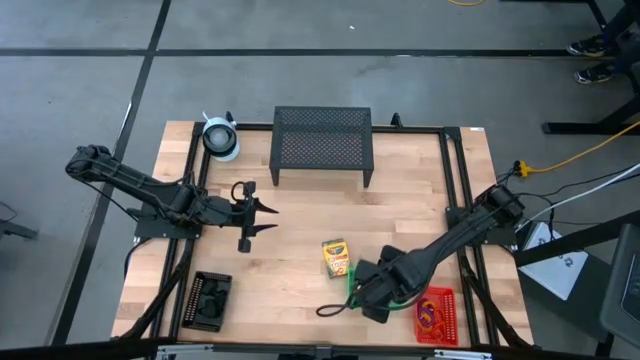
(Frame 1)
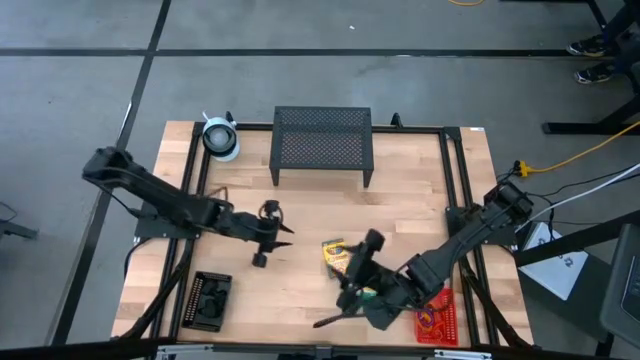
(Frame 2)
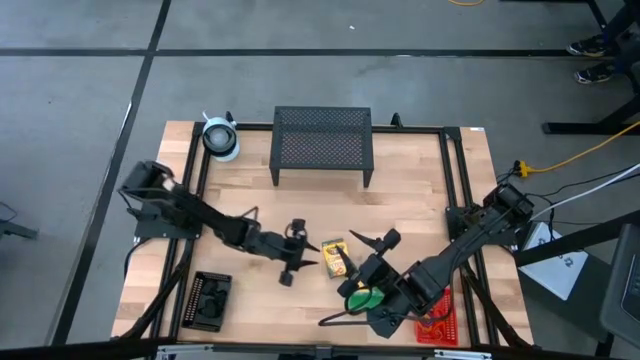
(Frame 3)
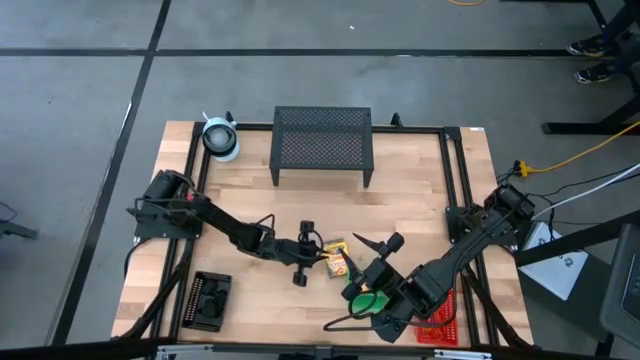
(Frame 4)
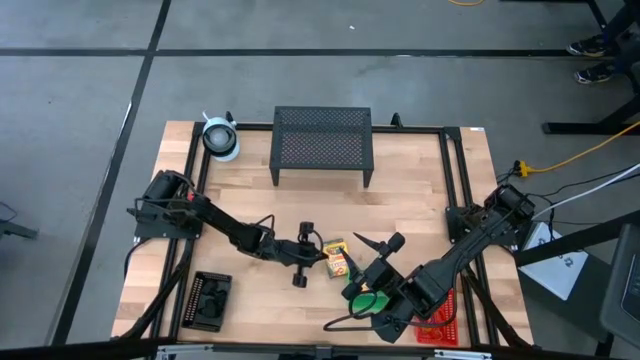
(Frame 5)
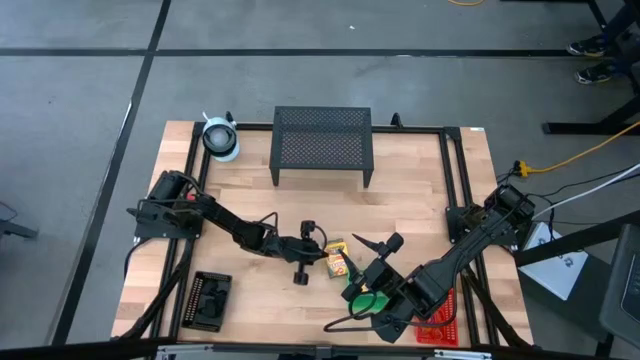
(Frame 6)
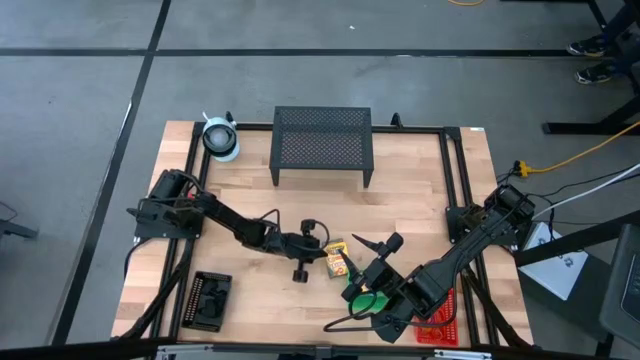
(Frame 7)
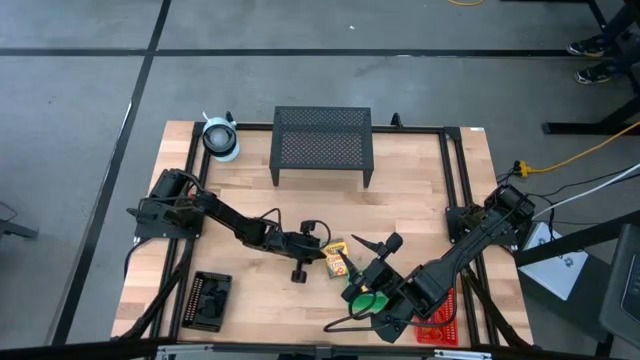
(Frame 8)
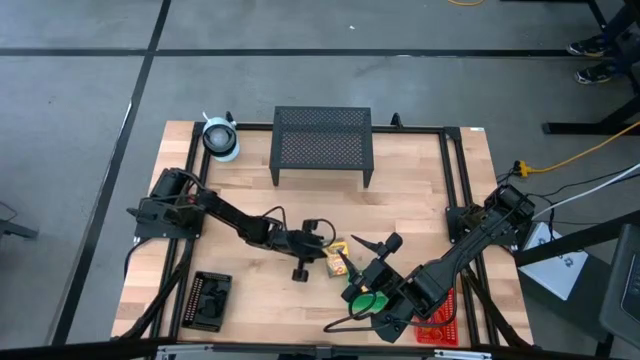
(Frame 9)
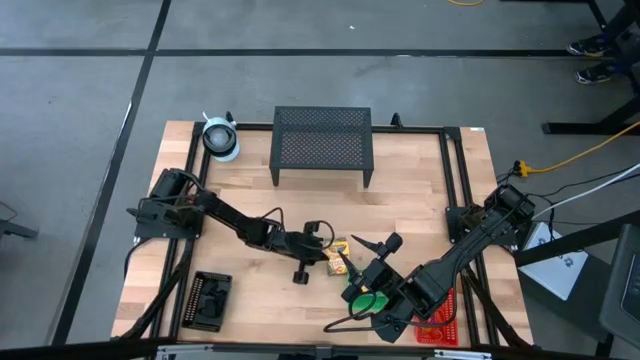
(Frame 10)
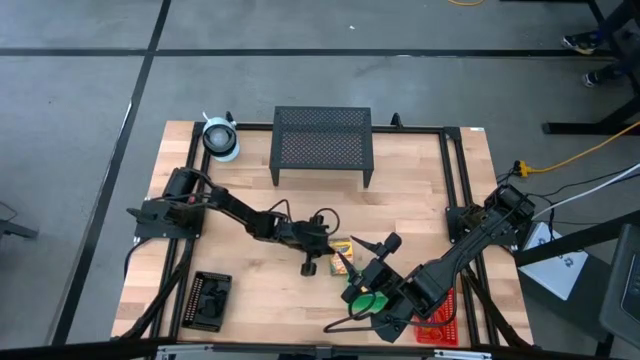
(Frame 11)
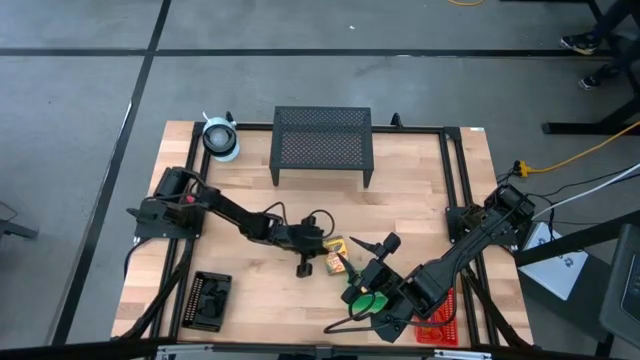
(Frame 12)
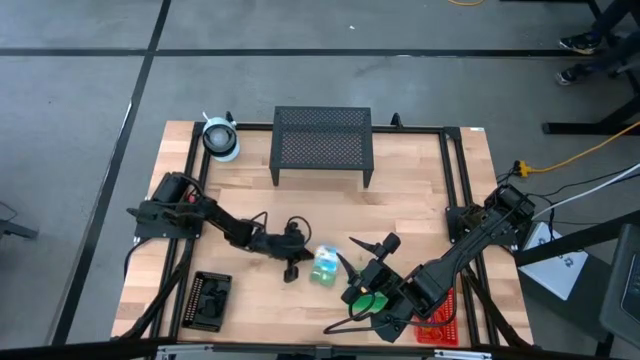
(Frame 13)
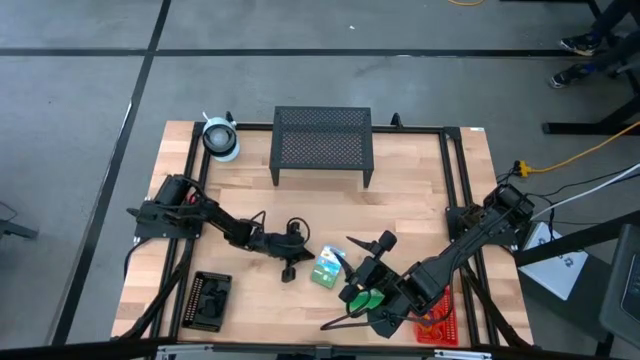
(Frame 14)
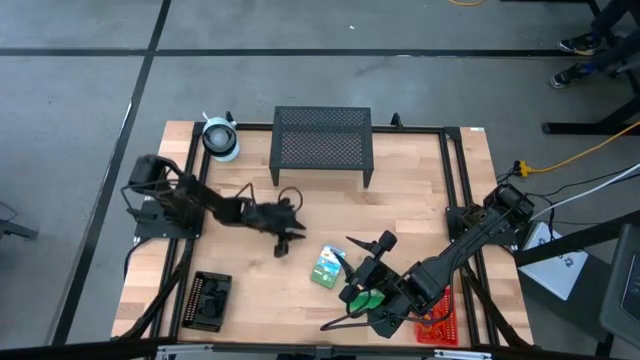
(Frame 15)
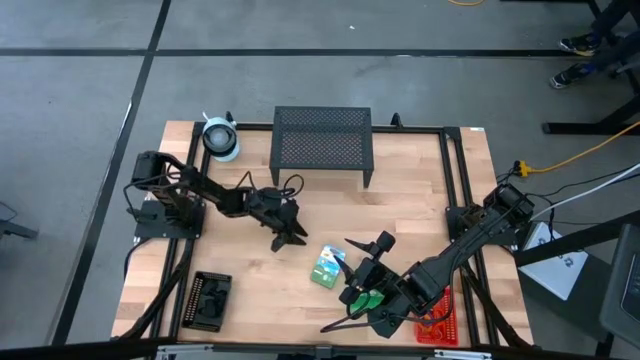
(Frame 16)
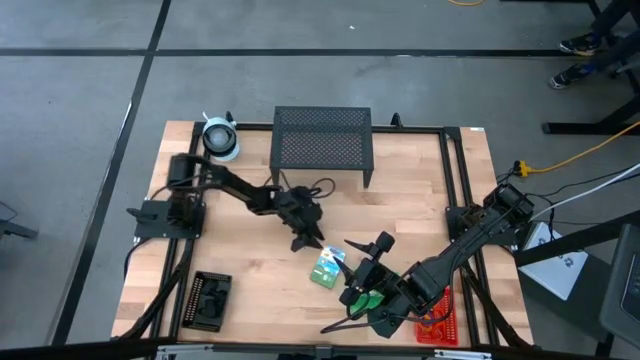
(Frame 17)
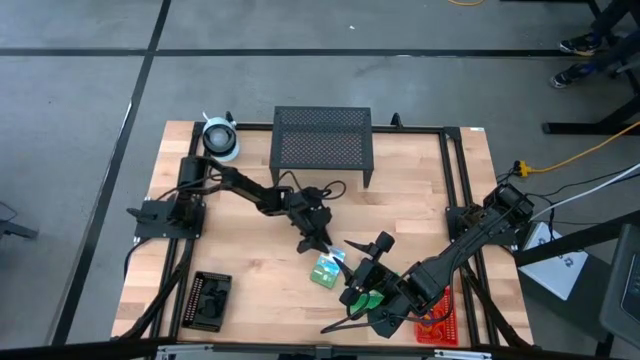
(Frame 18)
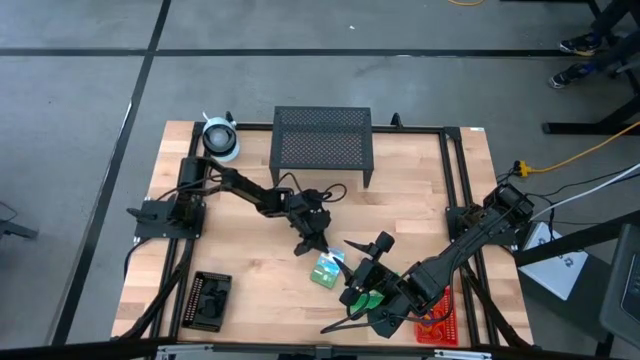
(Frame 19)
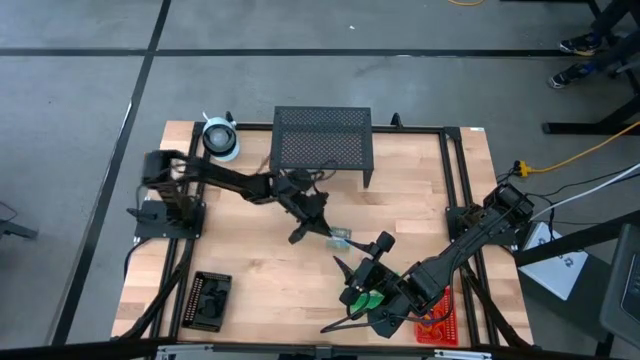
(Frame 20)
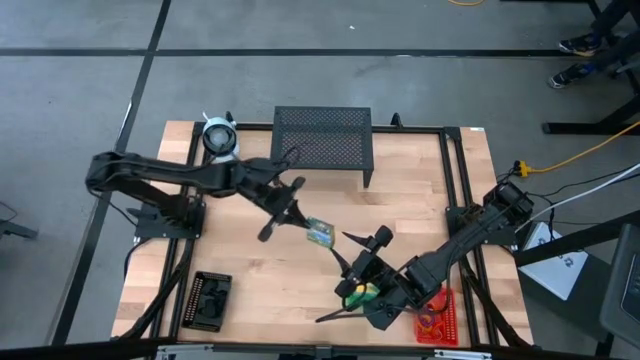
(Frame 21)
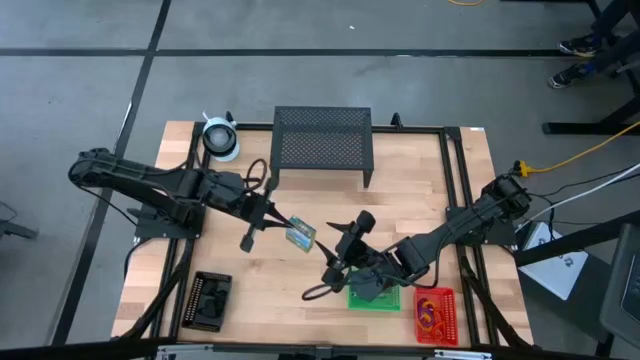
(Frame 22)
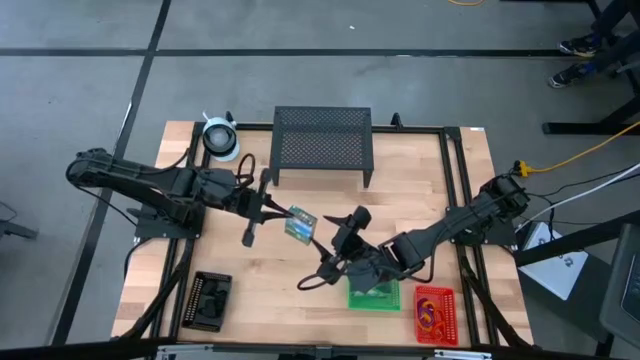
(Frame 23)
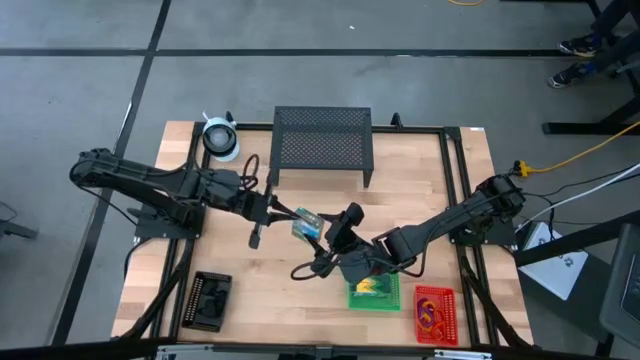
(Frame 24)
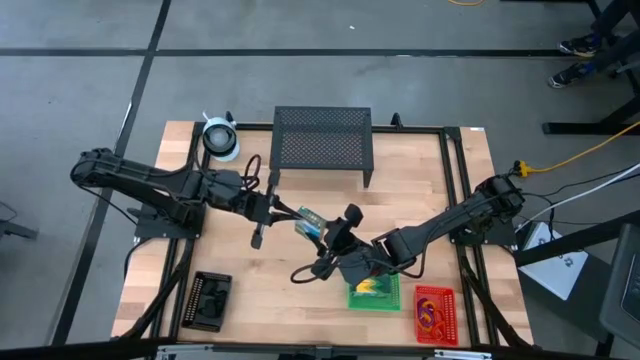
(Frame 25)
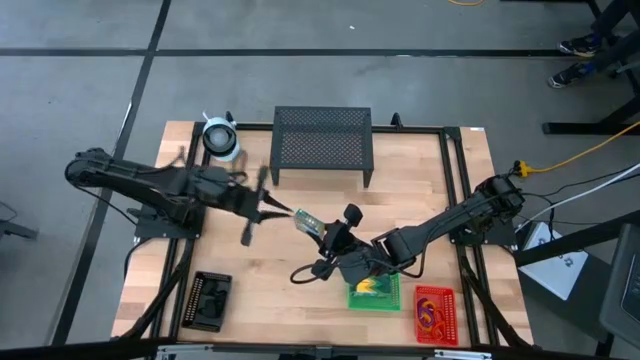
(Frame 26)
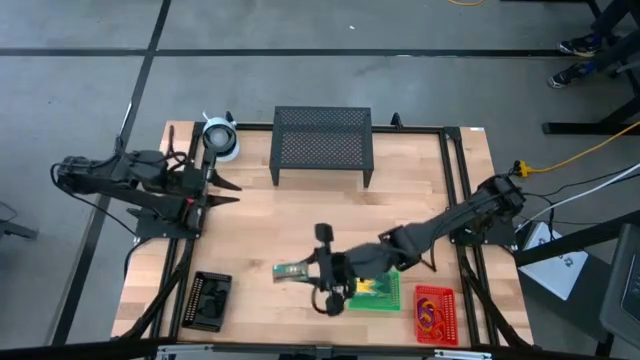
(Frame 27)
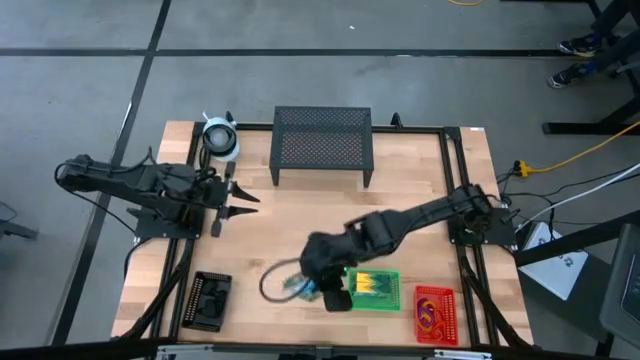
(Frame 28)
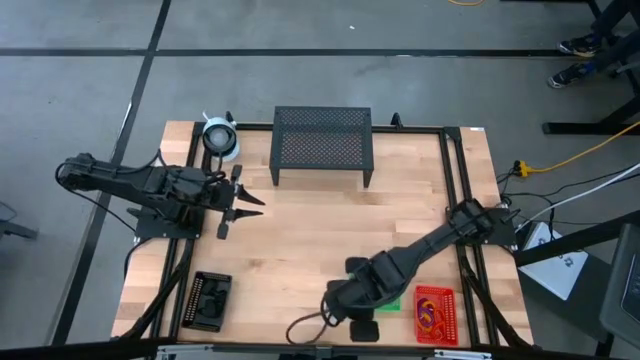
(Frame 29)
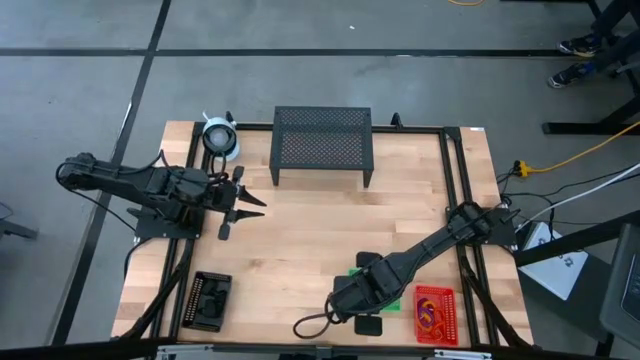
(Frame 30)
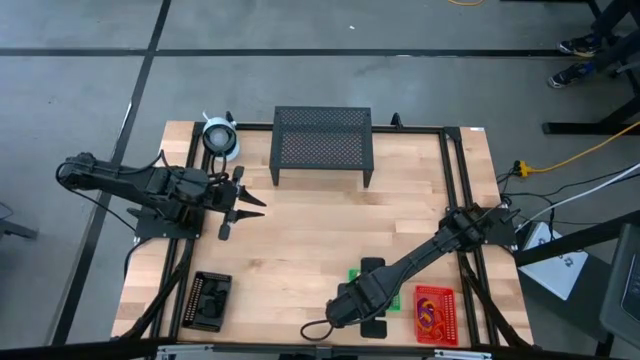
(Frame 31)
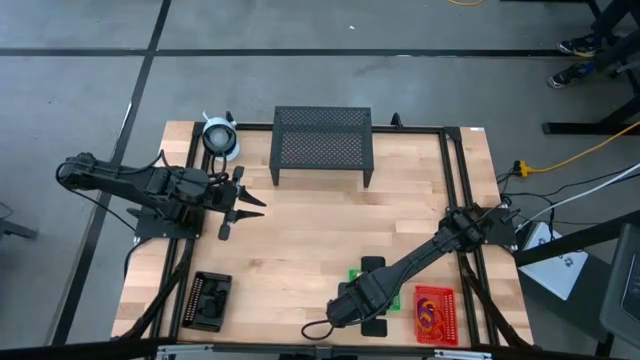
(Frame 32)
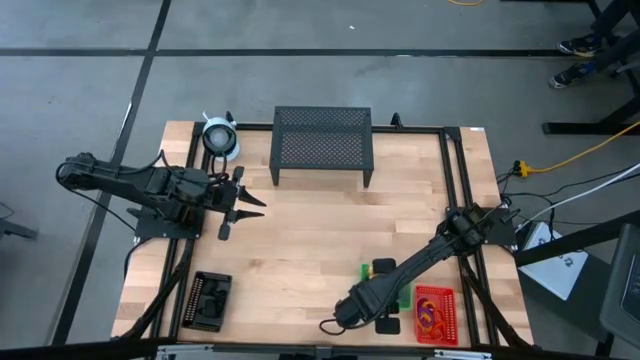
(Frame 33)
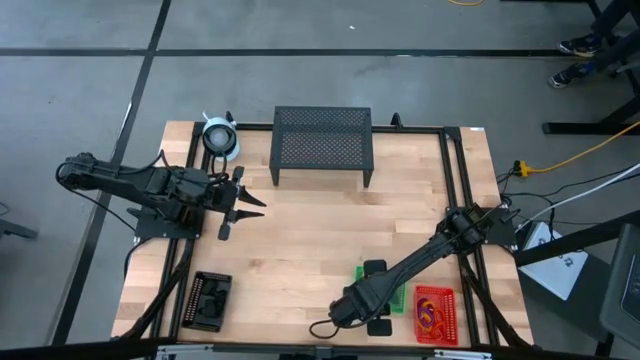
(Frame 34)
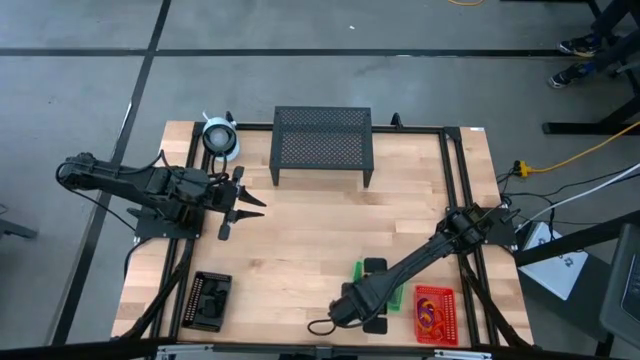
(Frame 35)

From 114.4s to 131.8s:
Task: Pick & Place Office Desk Supplies
Put the yellow green crayon box into the green bin

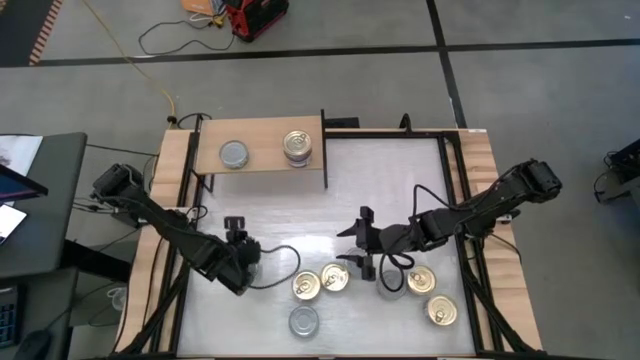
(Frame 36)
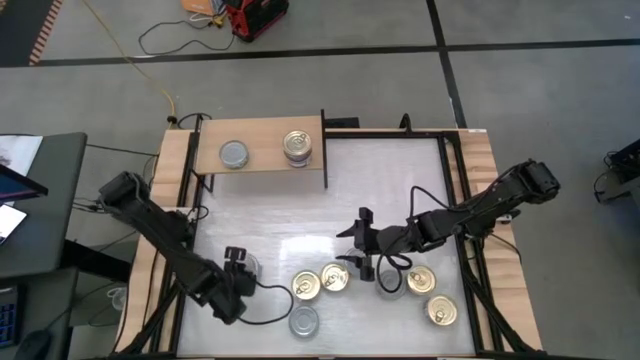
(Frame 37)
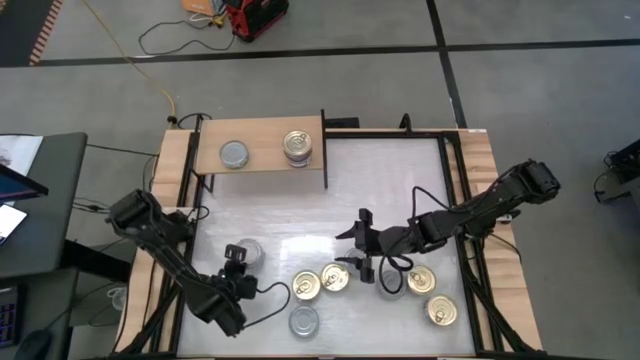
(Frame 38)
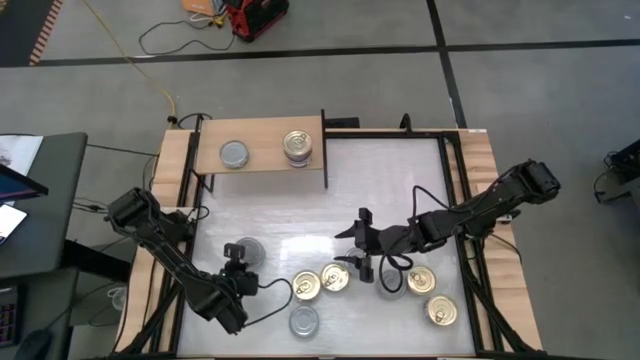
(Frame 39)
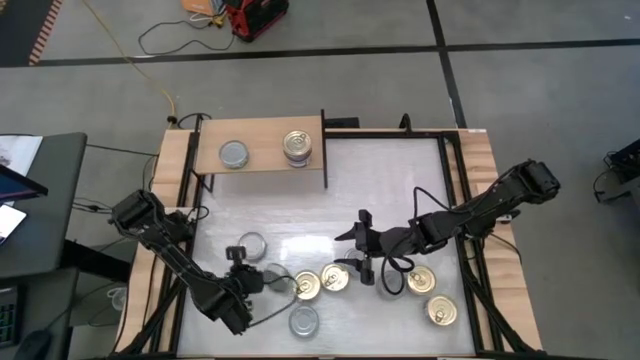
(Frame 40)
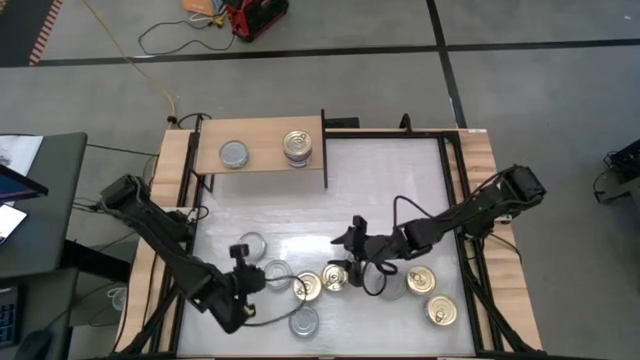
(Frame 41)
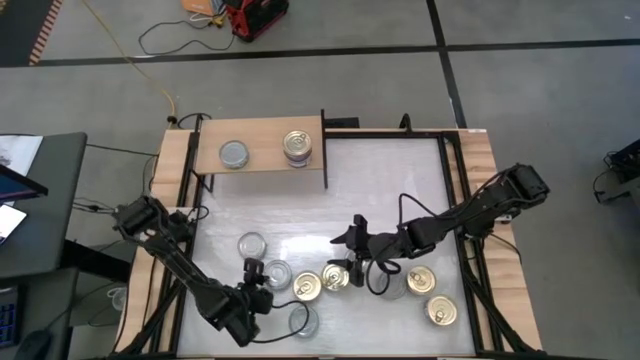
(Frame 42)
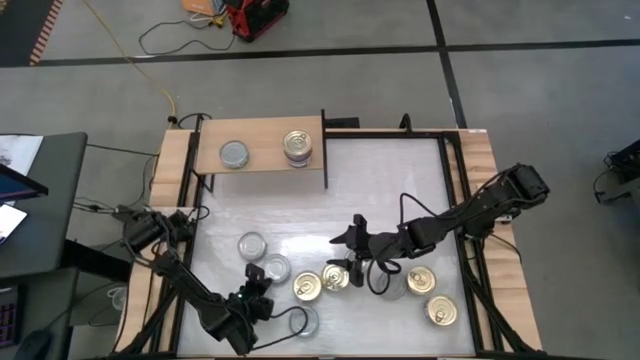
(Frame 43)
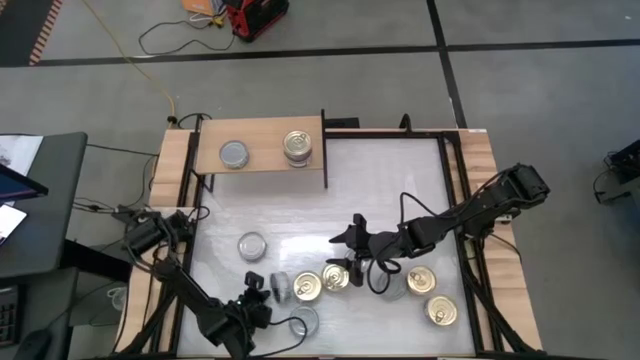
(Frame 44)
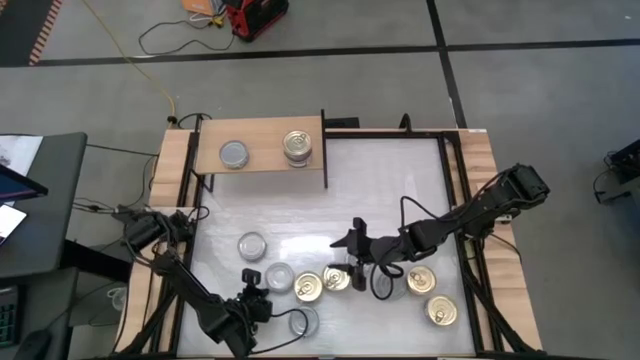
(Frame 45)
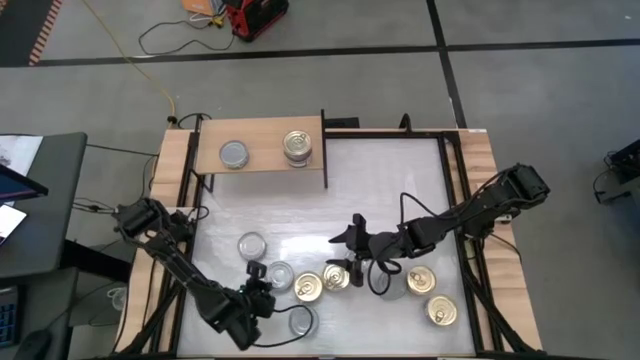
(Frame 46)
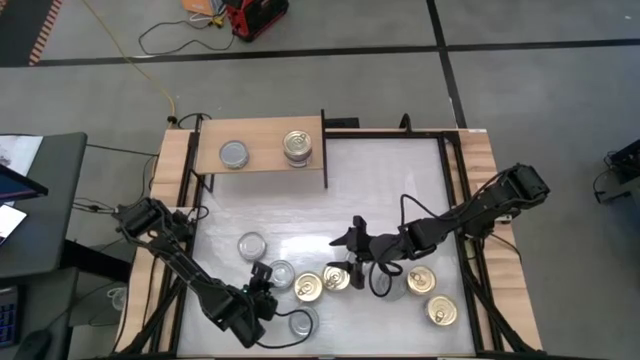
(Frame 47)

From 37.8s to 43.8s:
Task: Stack canned seafood by type on shelf
Stack the green-white tuna can on top of the green-white tuna can on the shelf
